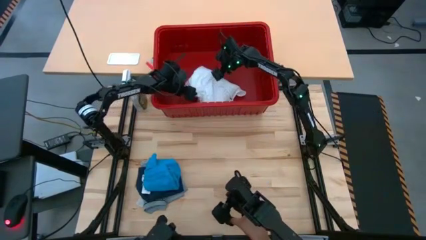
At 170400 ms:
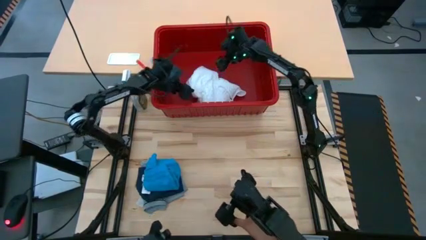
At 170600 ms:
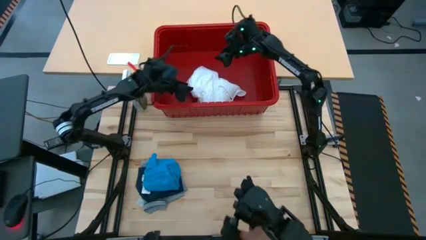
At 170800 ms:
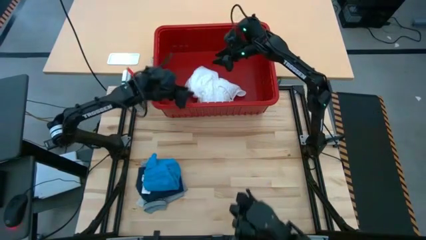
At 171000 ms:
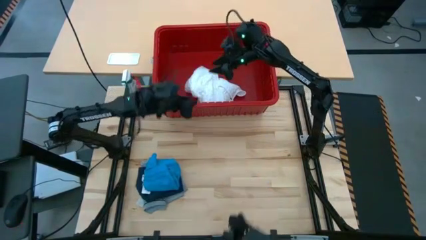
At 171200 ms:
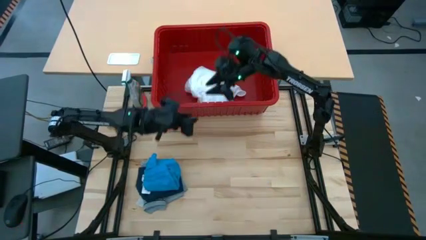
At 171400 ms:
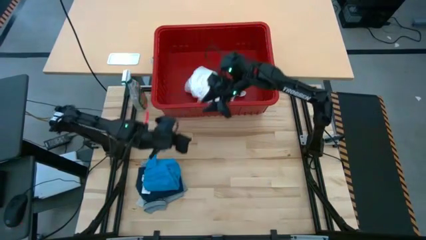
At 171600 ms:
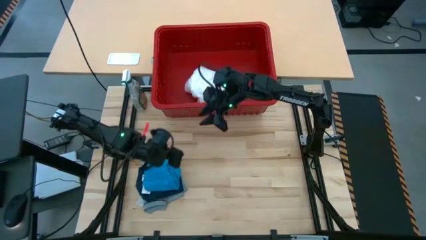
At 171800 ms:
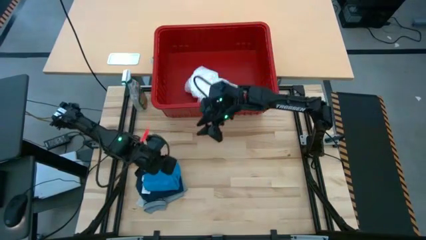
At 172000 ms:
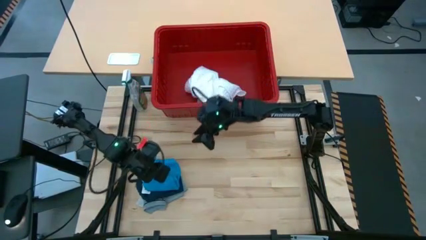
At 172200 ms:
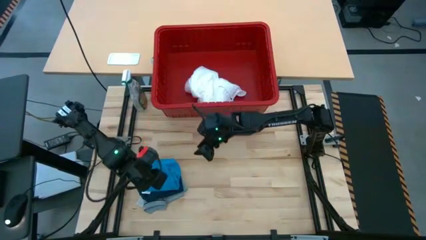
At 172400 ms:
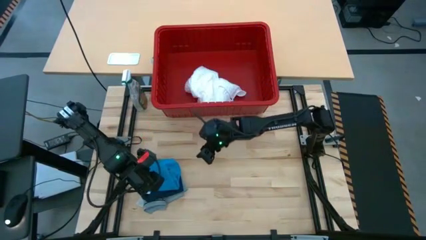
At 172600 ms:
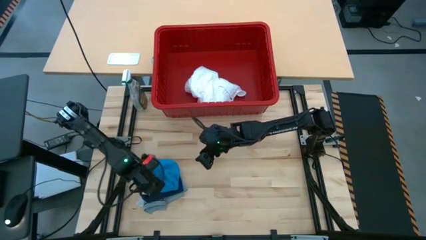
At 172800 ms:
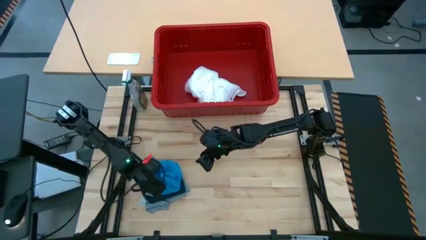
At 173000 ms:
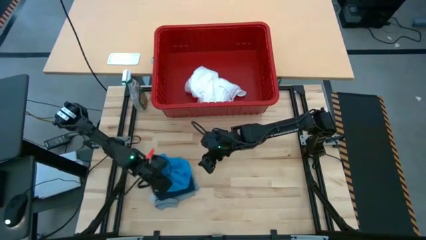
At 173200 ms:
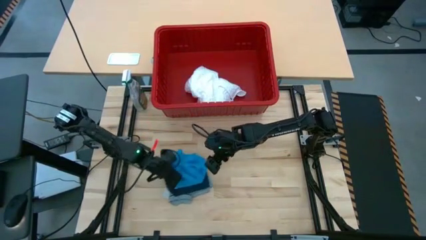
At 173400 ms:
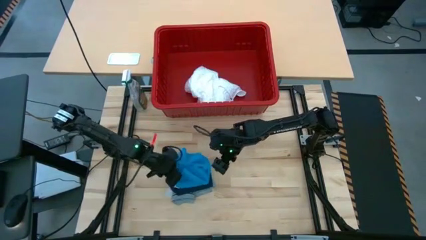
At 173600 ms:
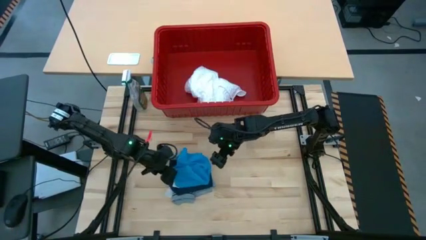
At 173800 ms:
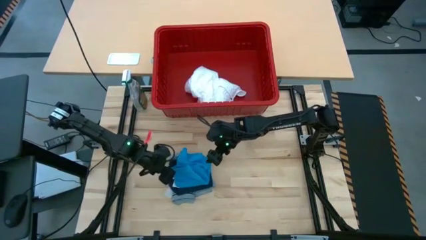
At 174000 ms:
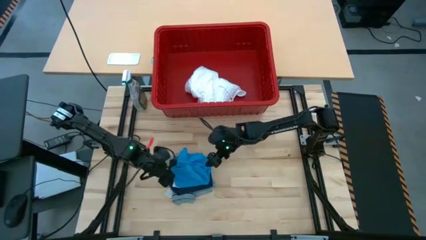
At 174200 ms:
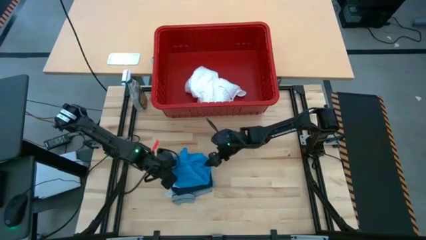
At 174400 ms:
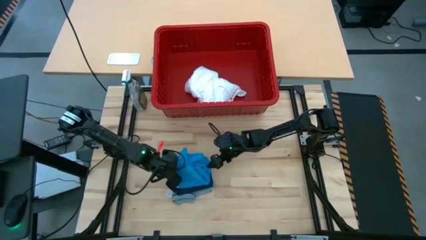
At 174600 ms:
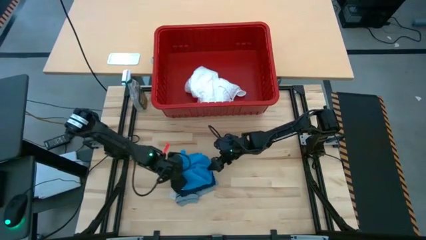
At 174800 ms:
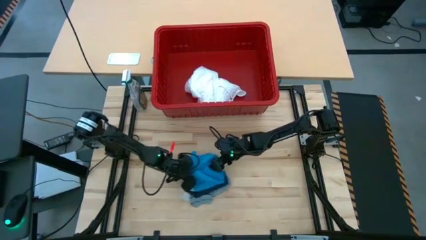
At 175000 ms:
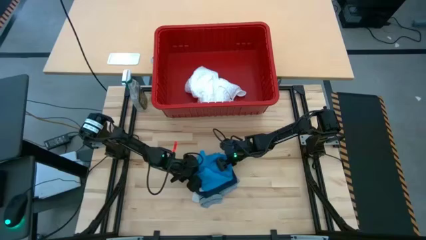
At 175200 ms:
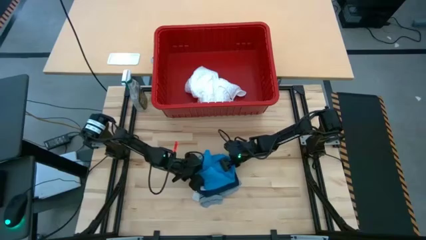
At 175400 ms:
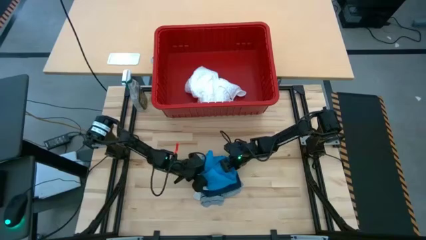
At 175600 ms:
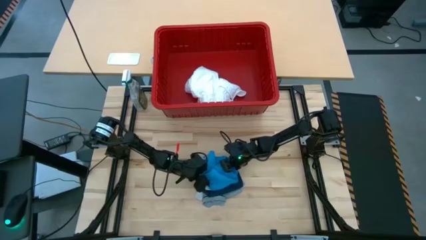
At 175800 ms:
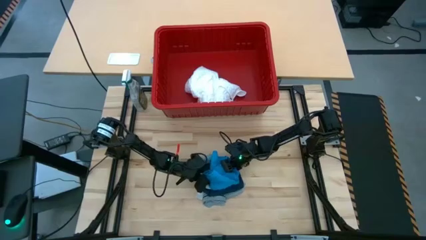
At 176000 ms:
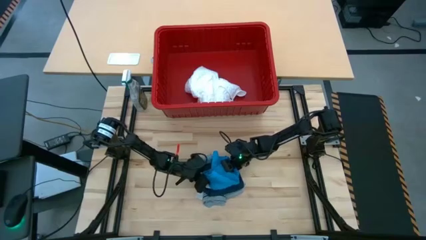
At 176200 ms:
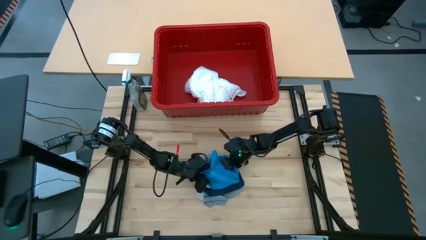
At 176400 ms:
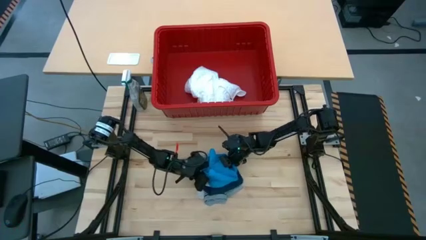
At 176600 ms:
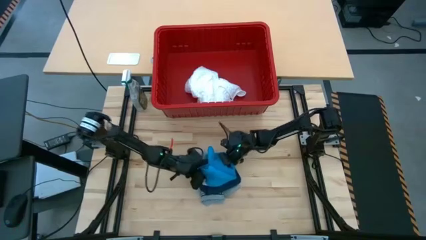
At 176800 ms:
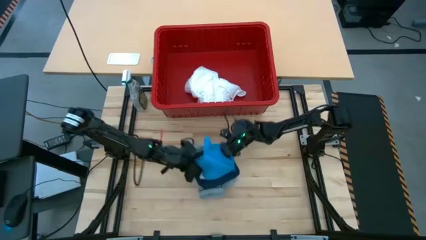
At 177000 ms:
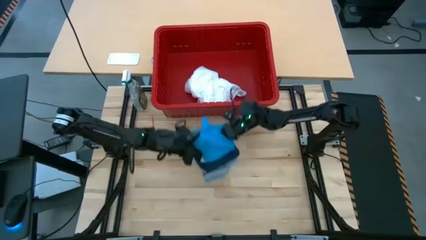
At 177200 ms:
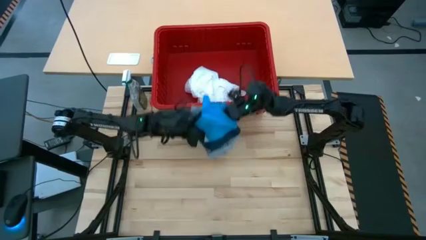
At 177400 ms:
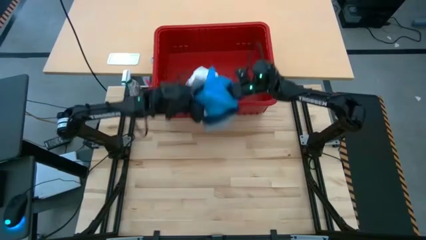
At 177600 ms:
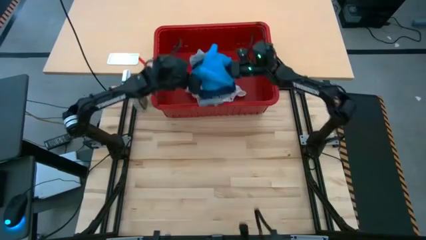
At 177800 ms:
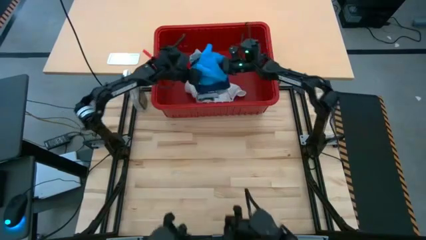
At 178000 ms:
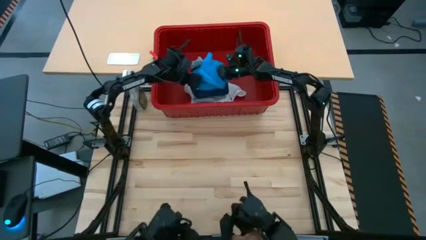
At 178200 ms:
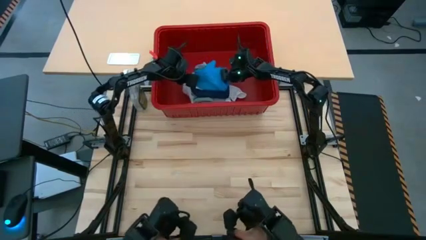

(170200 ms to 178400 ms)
Task: Fold laundry
Put the stacked folded clothes into the red laundry bin

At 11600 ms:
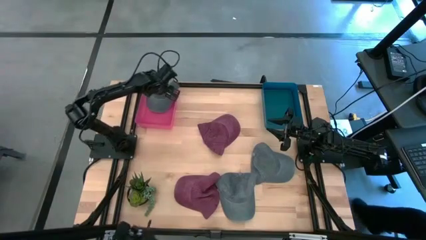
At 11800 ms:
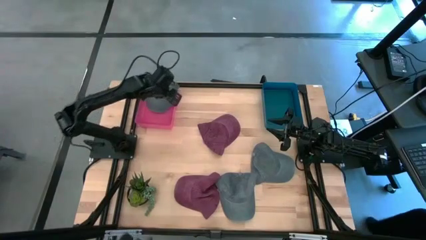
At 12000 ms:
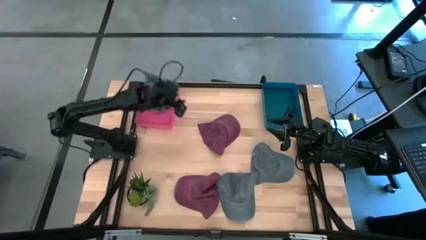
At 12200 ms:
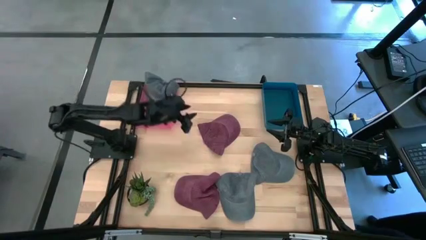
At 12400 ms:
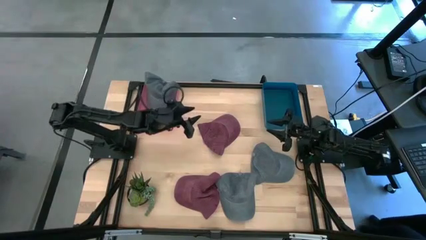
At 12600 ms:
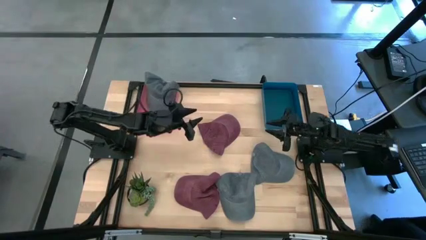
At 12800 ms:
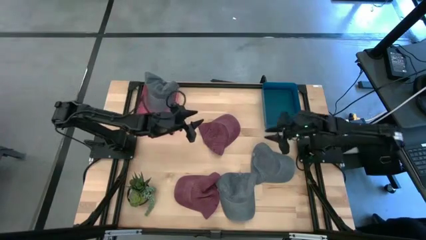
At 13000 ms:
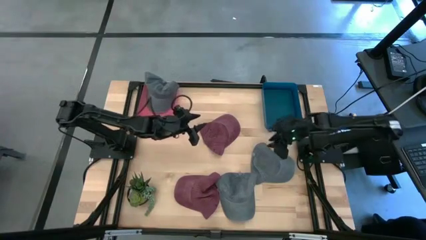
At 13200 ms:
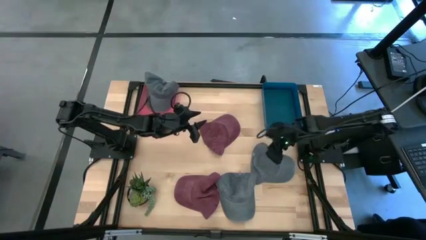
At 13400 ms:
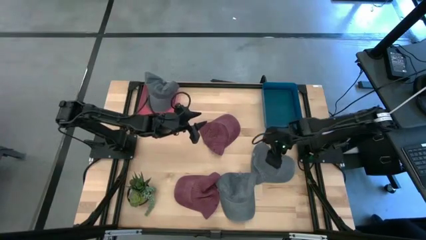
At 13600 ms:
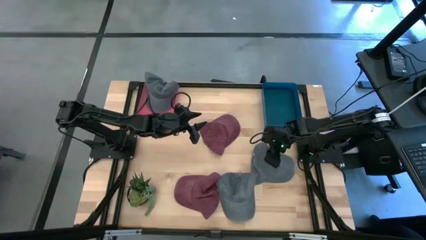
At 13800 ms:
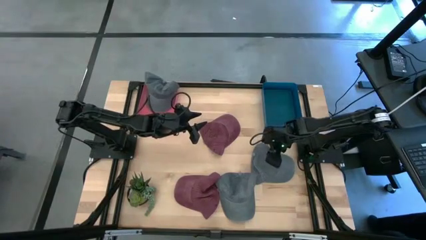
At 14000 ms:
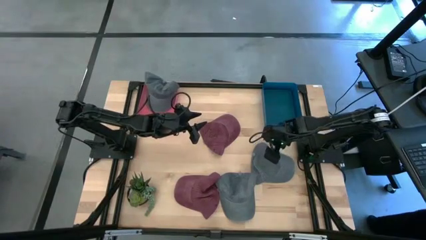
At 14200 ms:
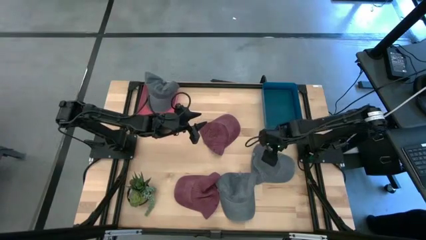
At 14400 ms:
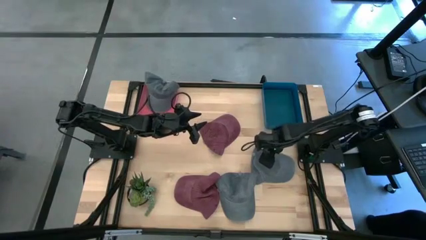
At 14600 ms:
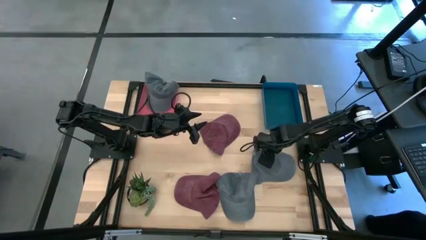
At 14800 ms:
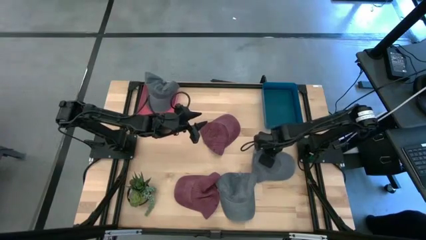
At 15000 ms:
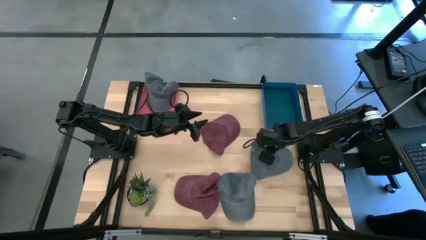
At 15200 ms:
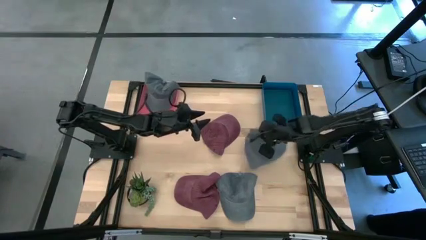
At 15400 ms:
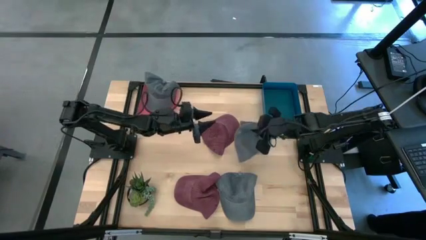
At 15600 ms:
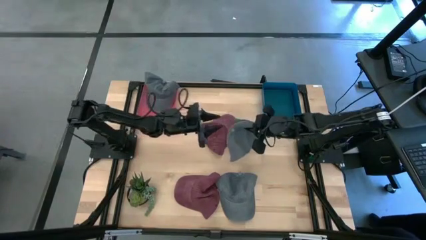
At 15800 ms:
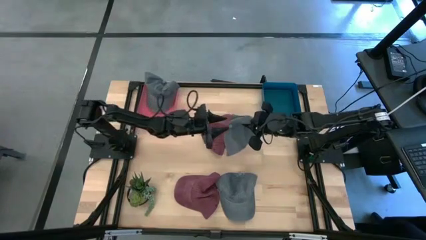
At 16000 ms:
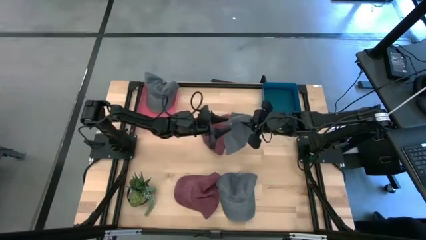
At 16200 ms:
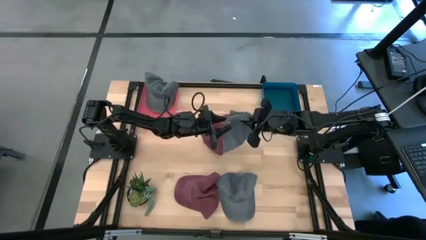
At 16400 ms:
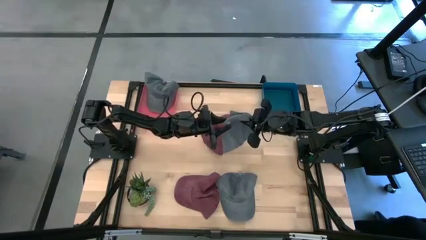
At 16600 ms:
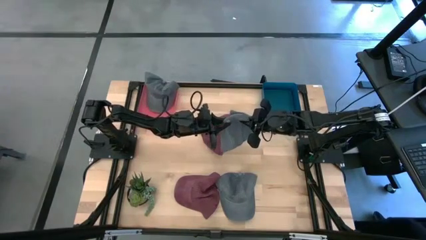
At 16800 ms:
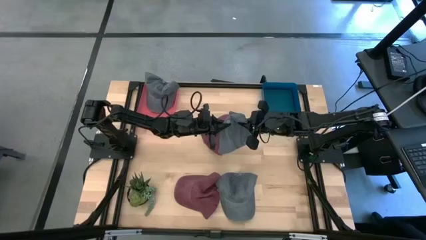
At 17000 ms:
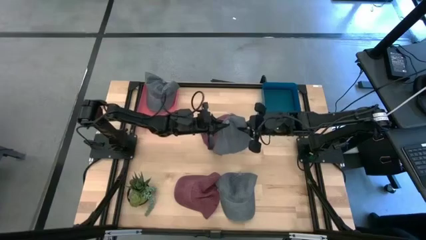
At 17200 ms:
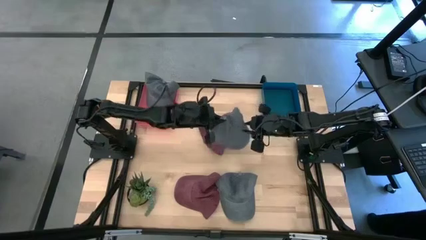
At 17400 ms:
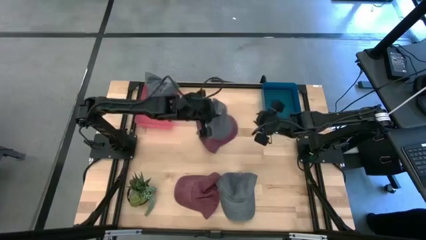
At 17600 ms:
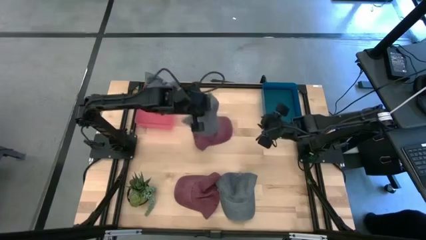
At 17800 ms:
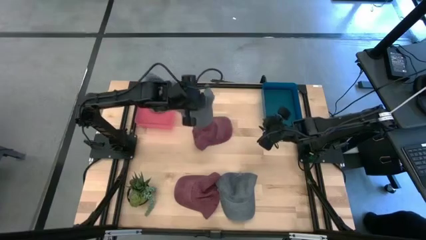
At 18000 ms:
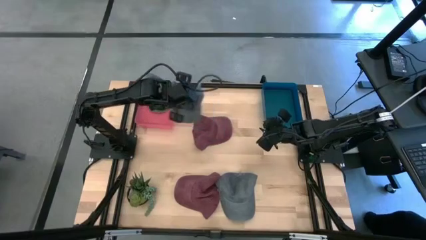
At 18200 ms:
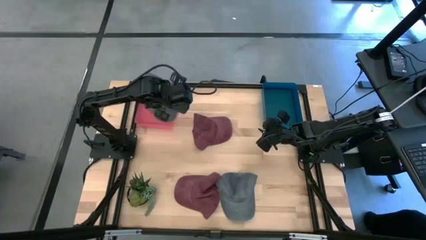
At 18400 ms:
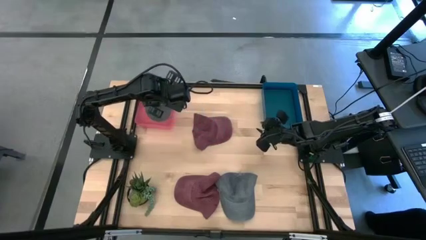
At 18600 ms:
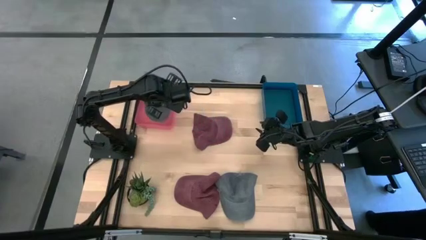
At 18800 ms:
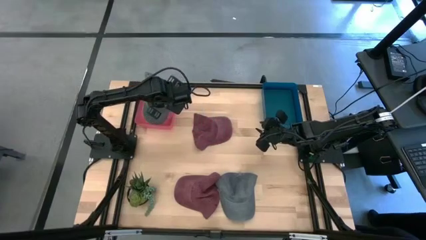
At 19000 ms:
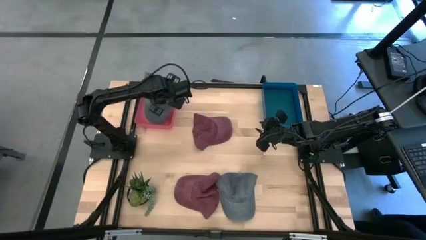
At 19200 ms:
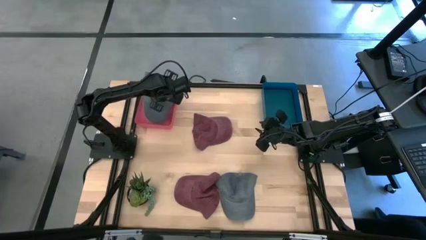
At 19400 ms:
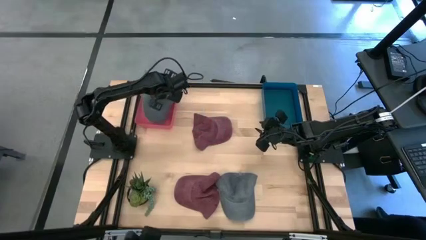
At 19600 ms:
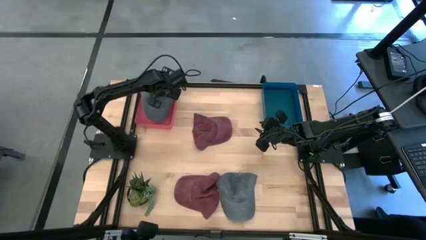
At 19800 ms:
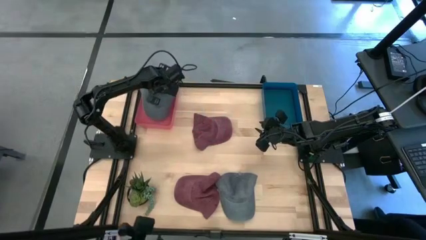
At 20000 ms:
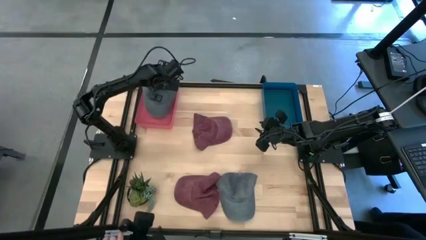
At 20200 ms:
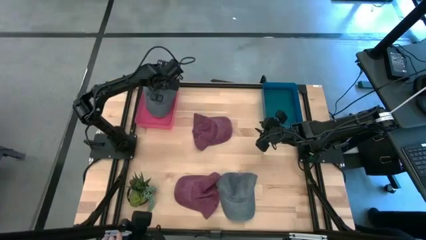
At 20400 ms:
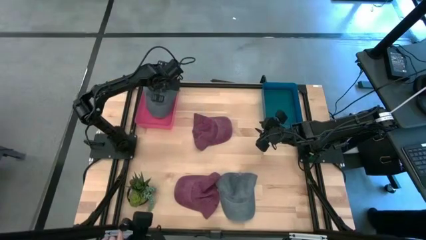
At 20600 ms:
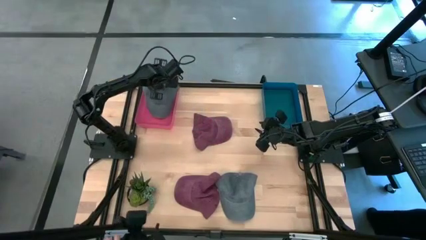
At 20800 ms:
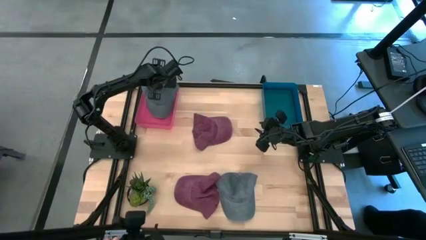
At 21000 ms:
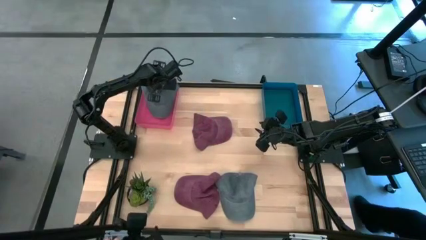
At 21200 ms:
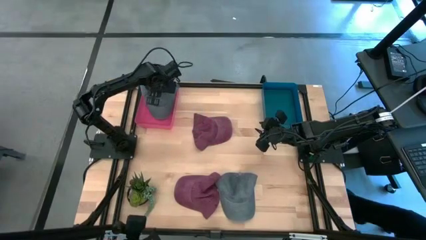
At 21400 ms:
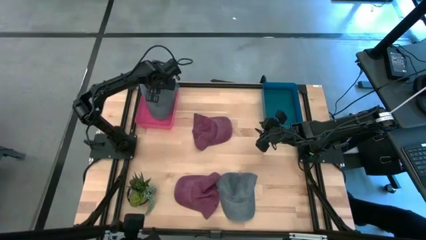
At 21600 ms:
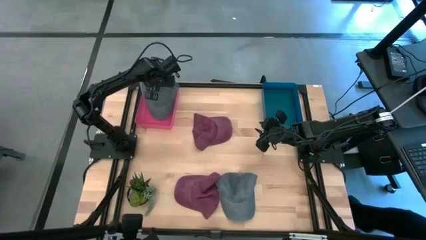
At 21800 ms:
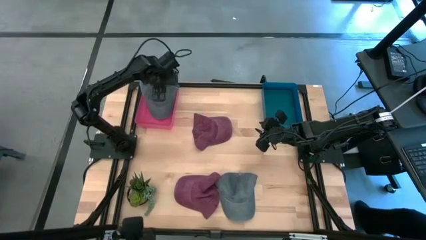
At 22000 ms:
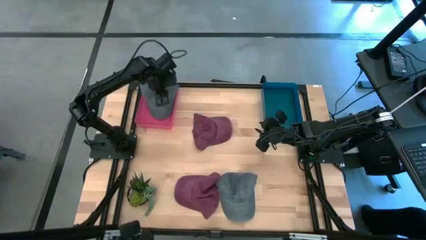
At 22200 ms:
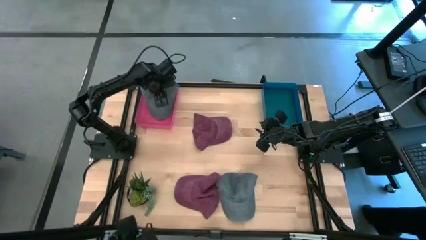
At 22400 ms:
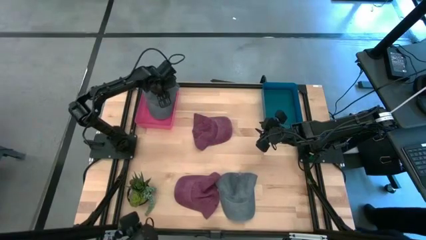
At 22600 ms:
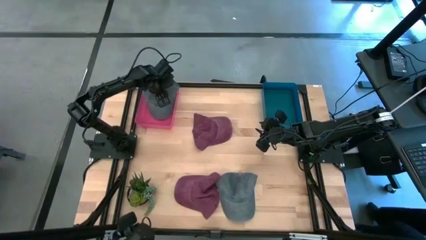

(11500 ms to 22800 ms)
Task: Pick & Place hat
Put the top gray cap into the pink bin
